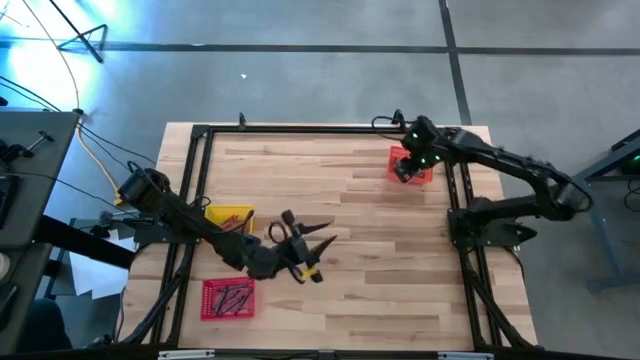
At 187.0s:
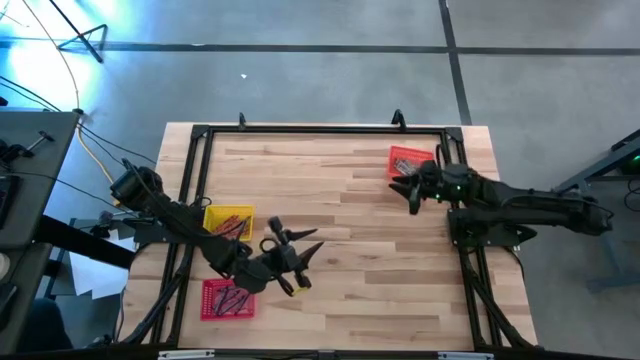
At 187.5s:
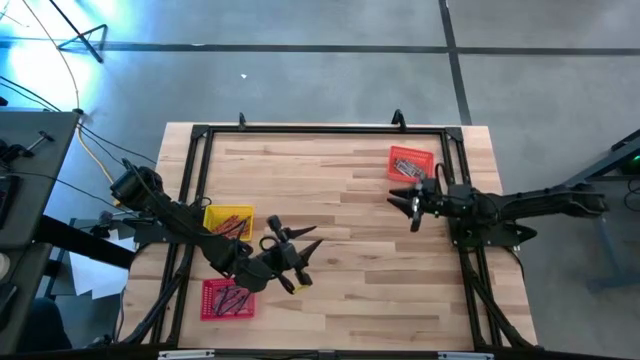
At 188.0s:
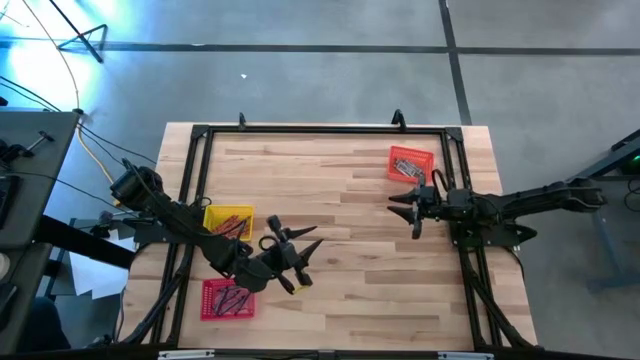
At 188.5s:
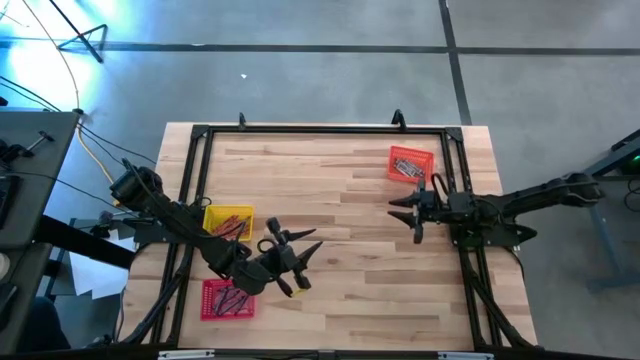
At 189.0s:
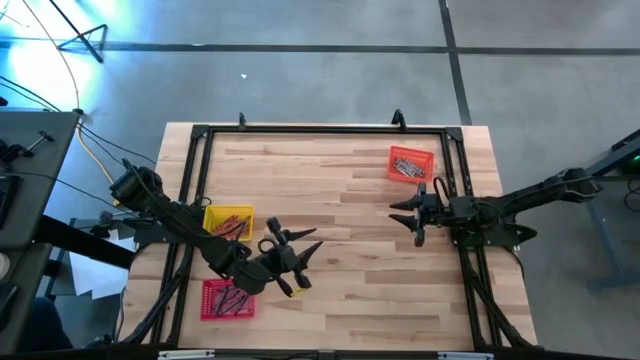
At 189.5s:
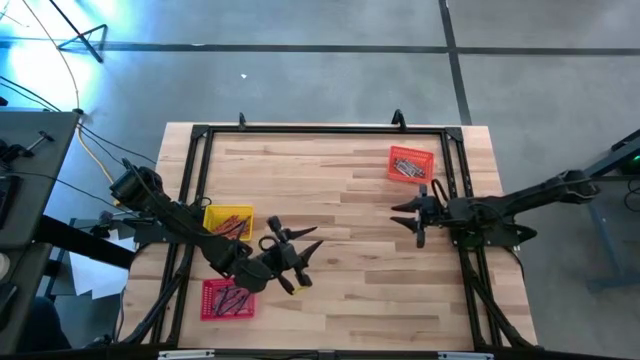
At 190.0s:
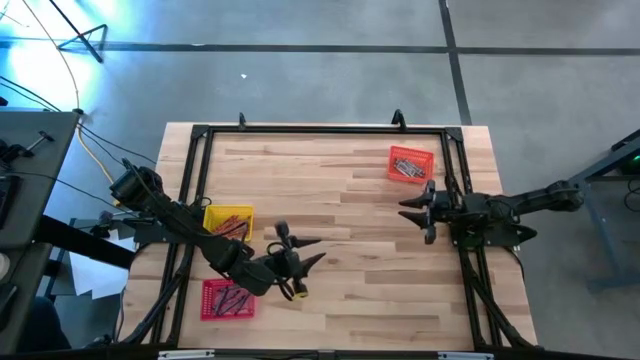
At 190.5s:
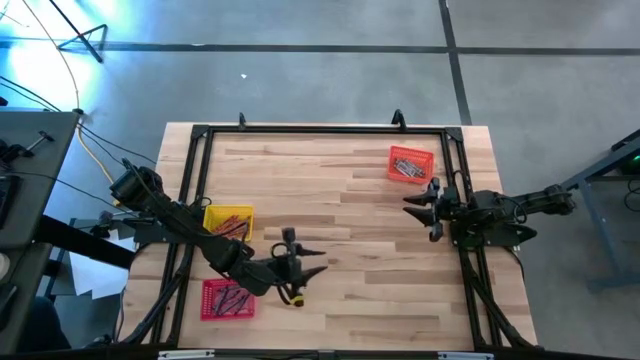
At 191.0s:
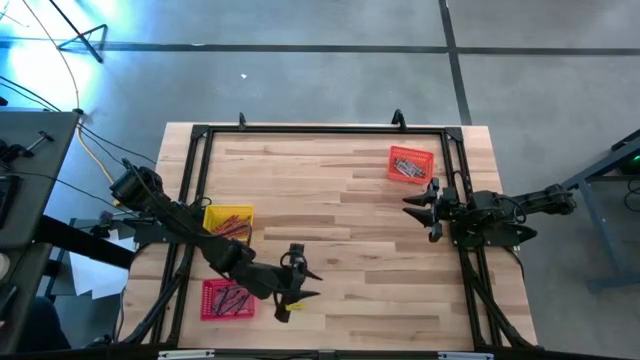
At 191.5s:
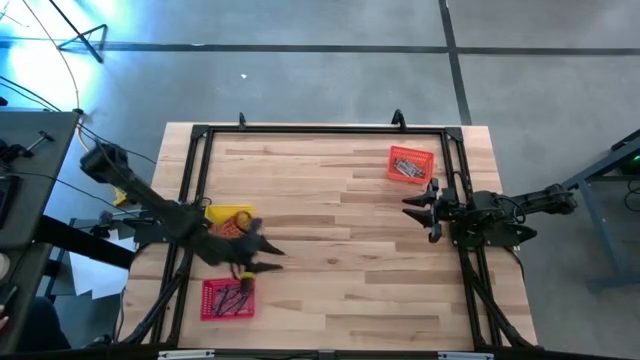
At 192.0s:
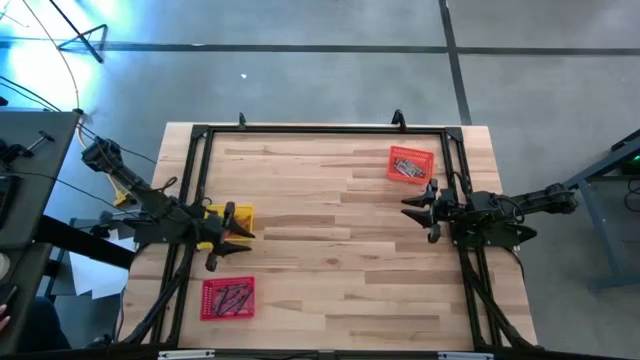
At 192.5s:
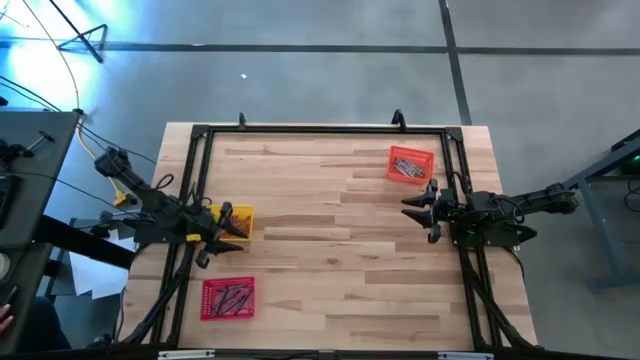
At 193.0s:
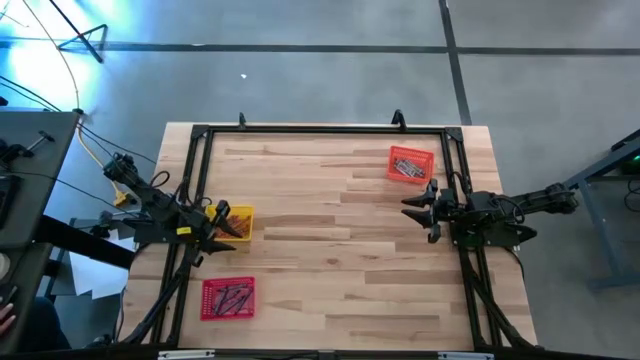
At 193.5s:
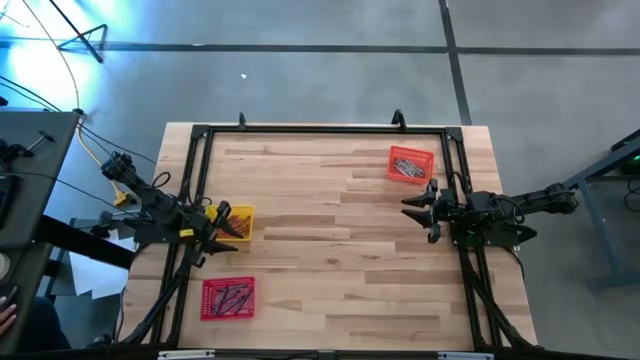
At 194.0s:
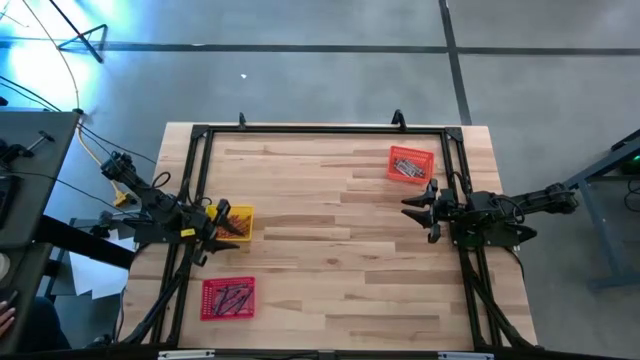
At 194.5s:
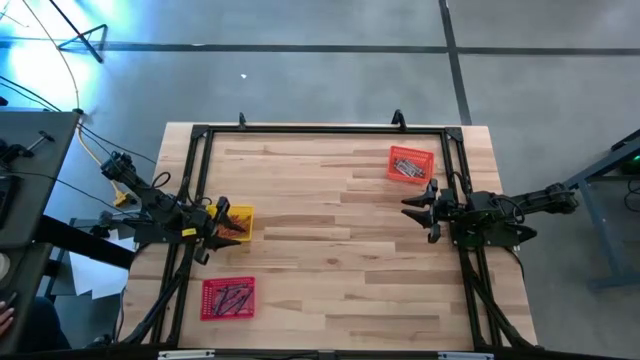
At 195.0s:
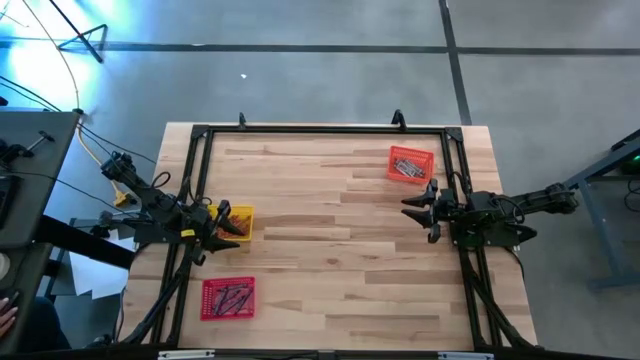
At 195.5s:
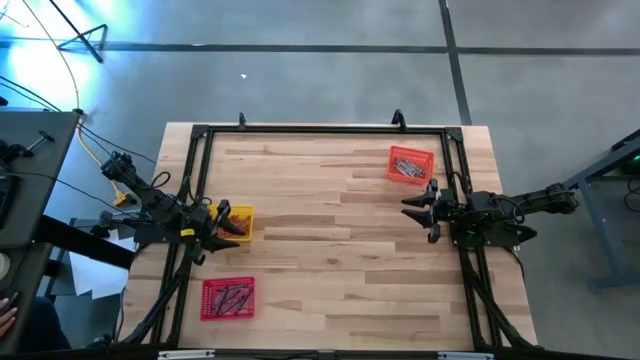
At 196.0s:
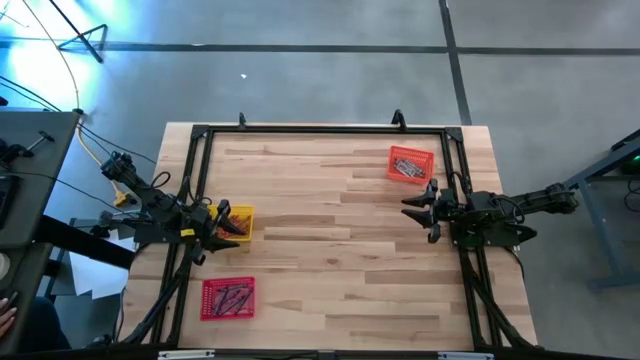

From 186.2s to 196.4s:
Task: Sort crayons
Return to Home Position

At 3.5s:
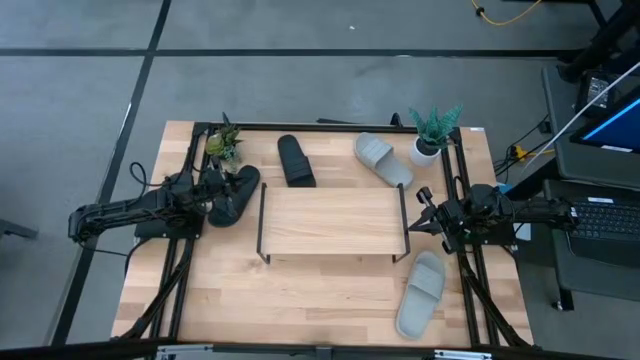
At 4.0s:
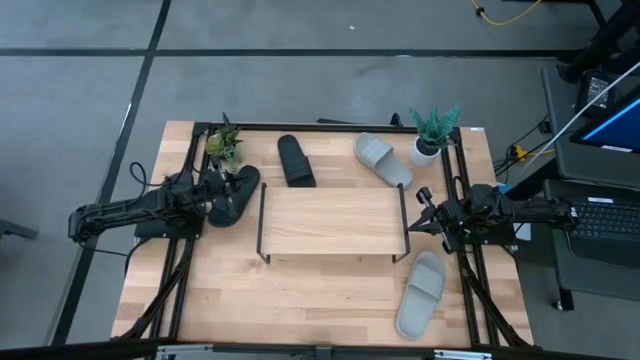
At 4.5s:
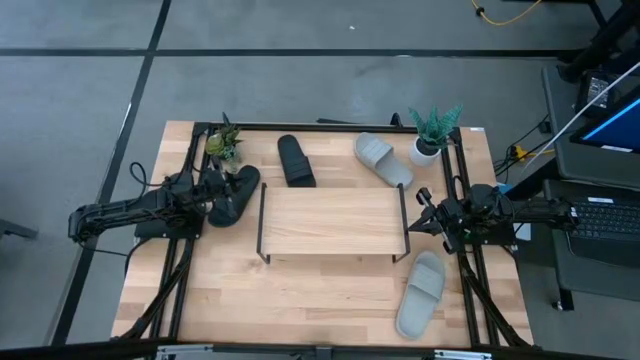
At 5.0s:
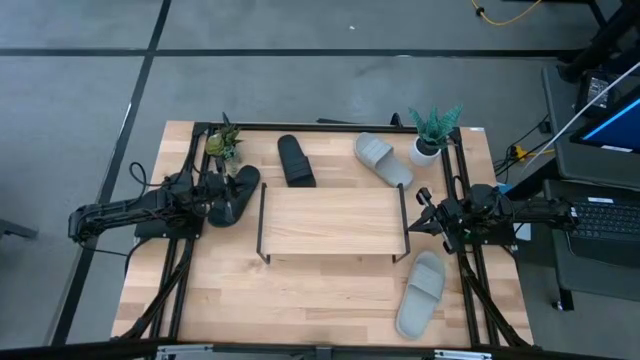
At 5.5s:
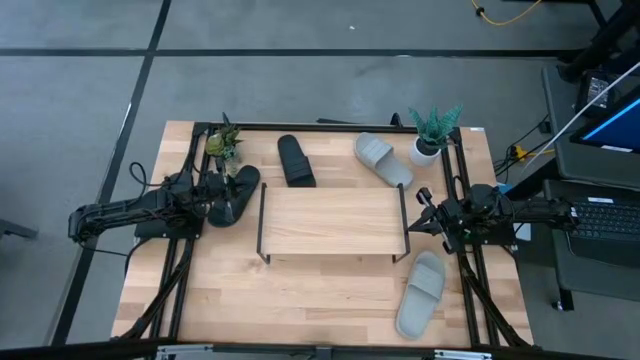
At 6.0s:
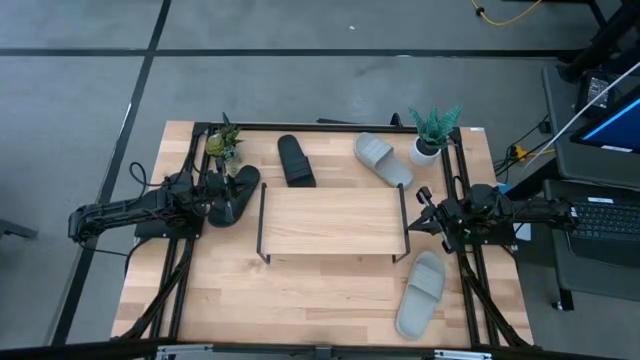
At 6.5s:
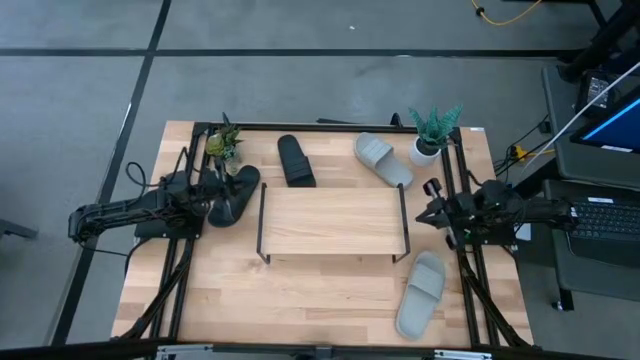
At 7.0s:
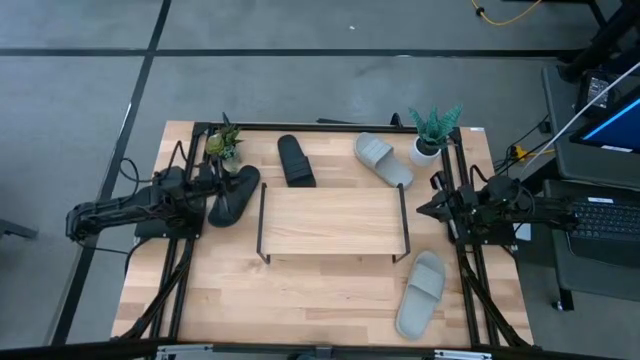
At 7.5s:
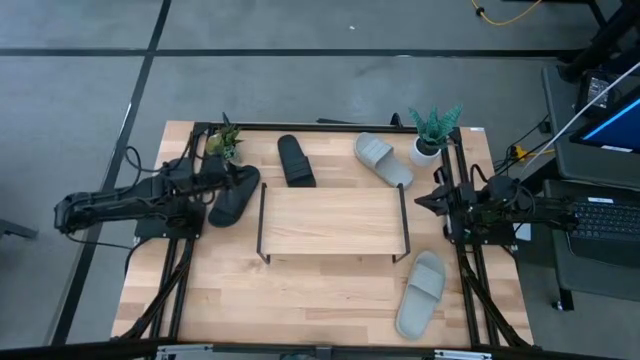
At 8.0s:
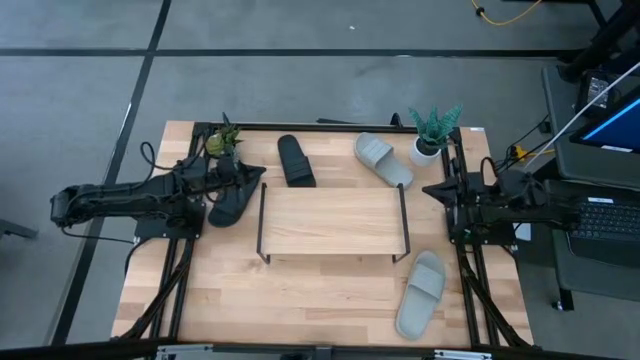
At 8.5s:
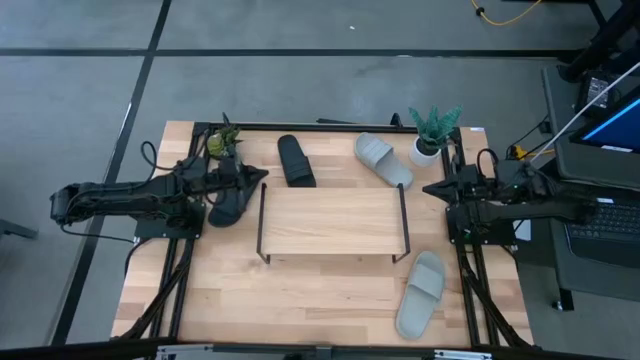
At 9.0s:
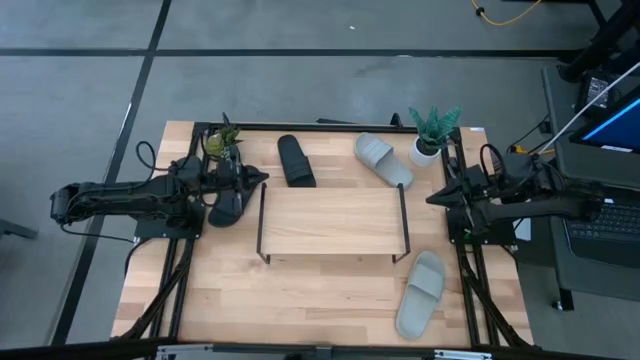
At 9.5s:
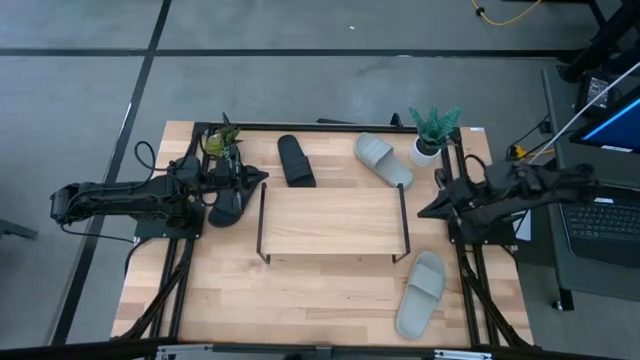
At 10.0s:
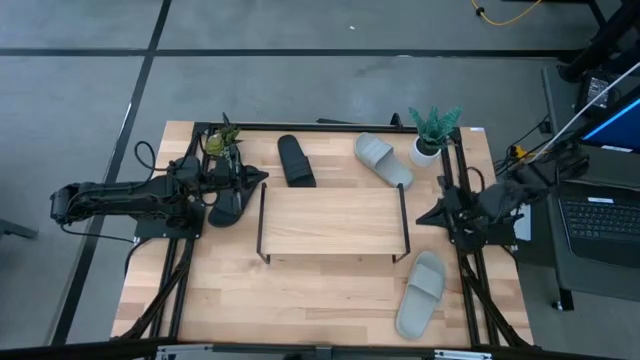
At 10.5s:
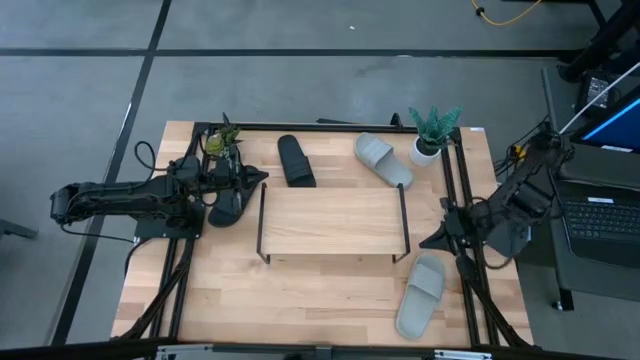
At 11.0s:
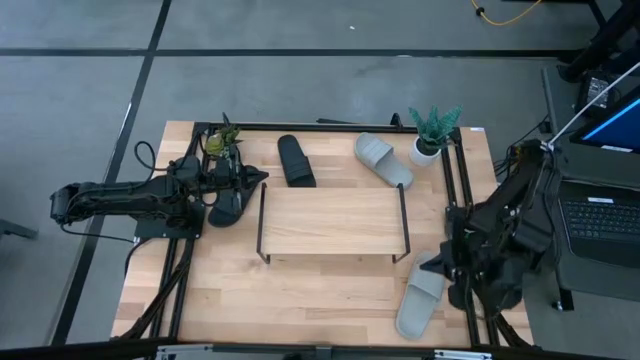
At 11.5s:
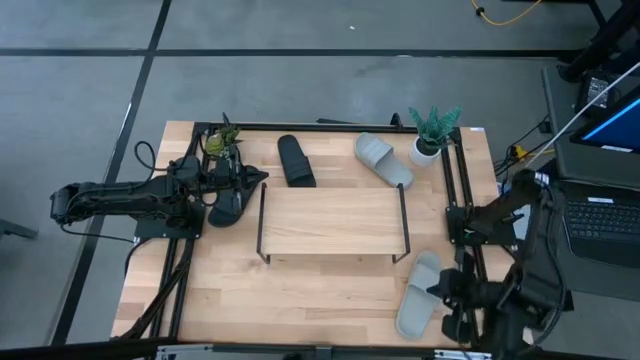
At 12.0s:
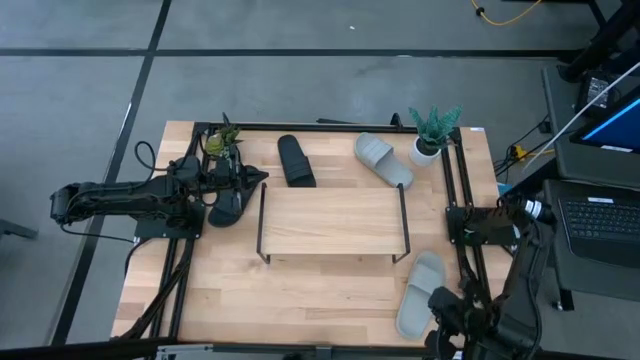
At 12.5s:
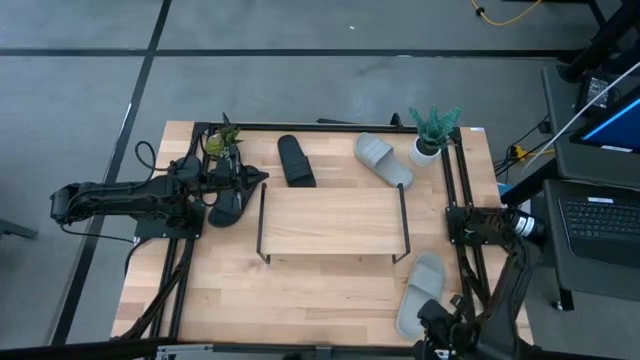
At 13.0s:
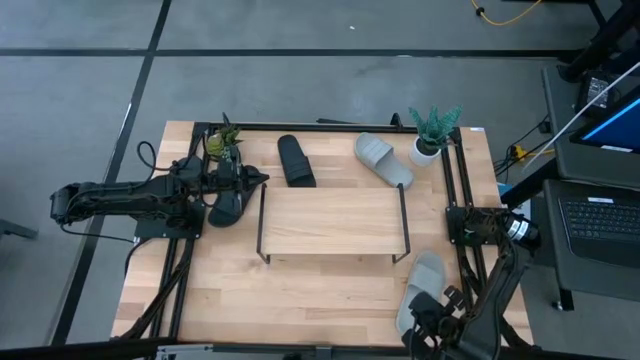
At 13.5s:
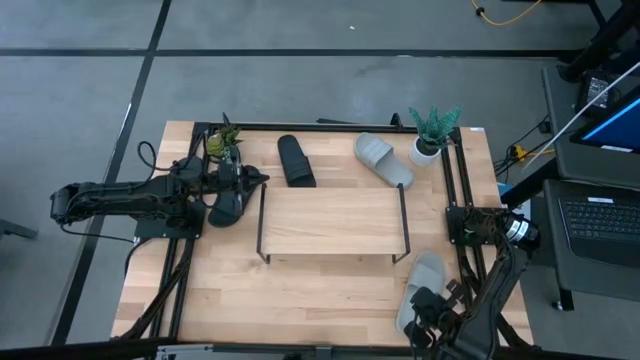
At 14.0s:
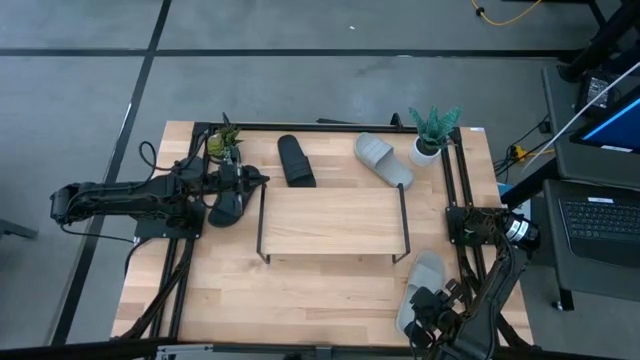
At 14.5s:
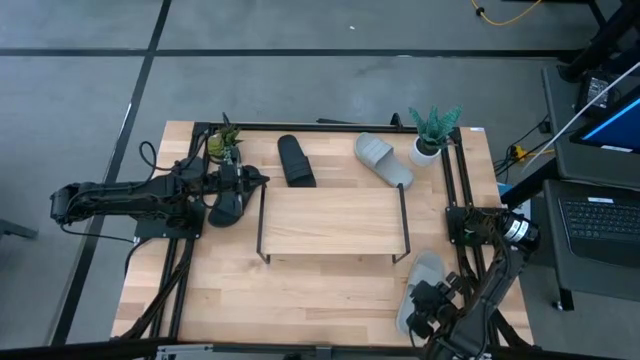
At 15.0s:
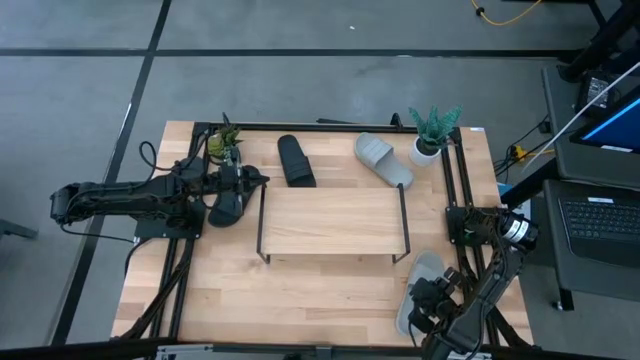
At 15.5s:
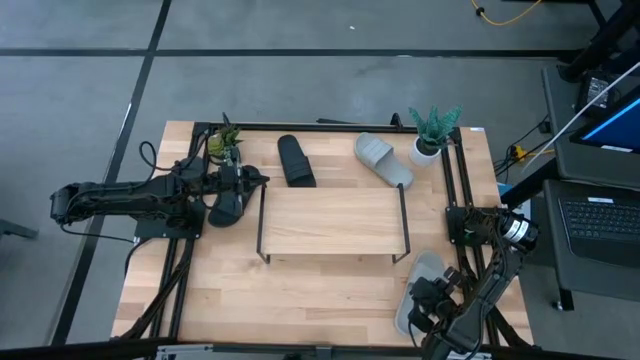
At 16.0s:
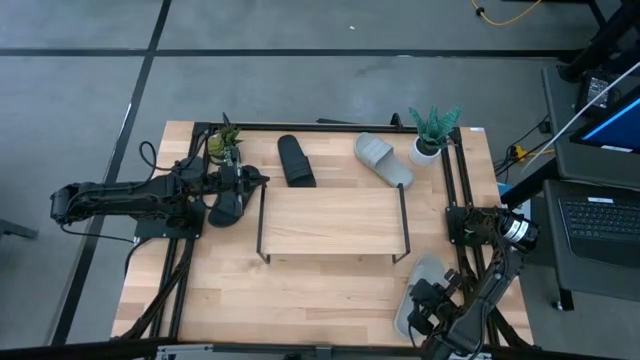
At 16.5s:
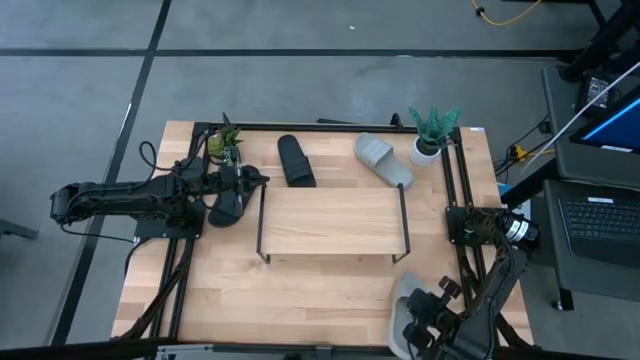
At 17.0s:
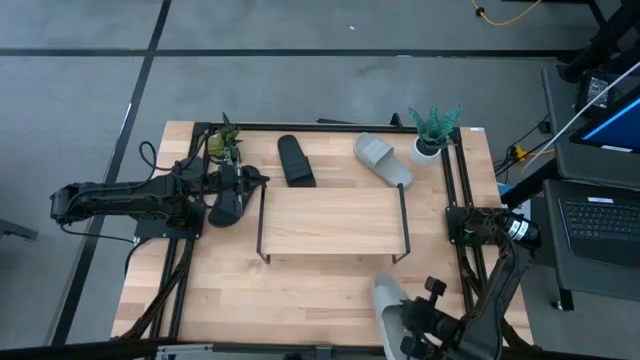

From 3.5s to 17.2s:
Task: Pick and place slides into the shelf
Put the bottom gray slide on the shelf
